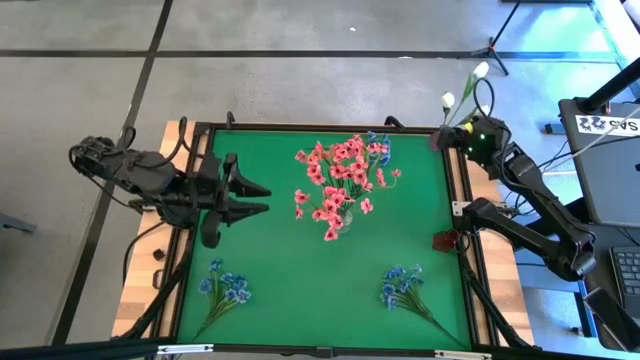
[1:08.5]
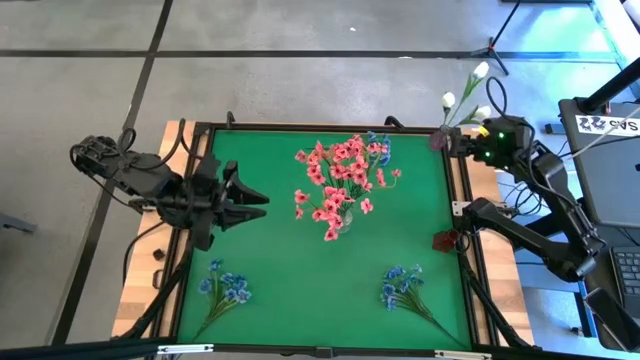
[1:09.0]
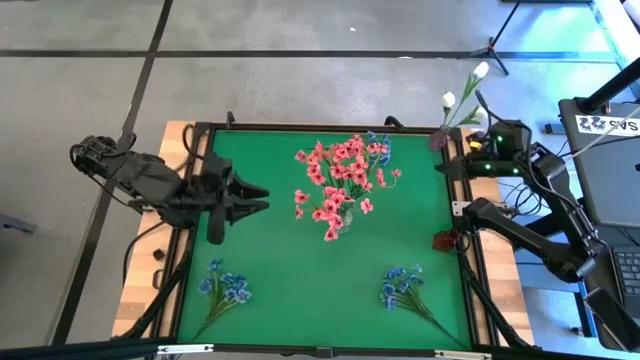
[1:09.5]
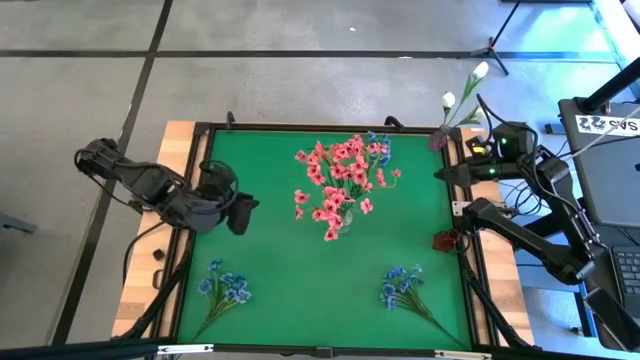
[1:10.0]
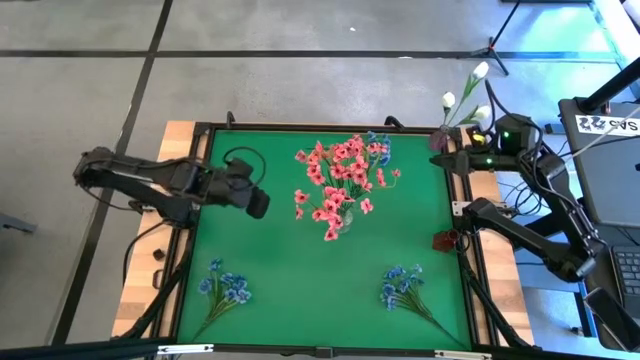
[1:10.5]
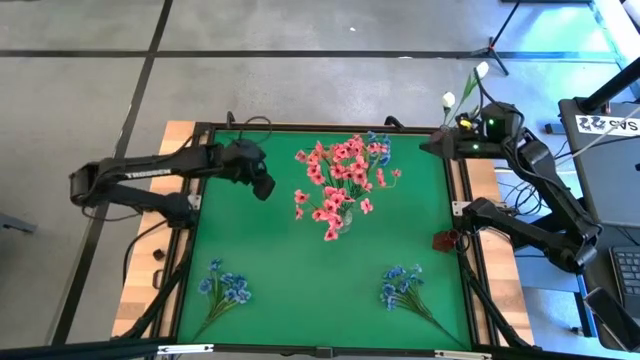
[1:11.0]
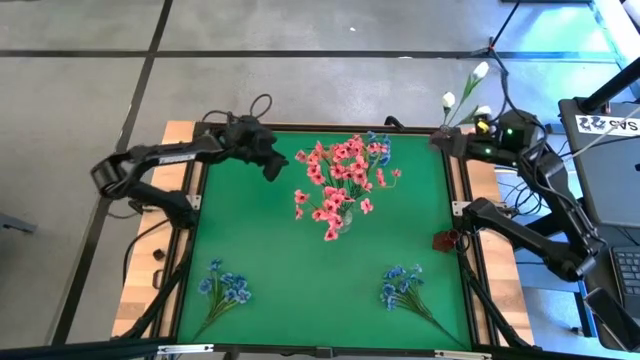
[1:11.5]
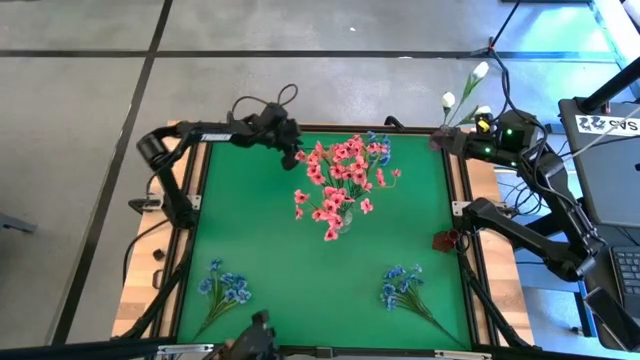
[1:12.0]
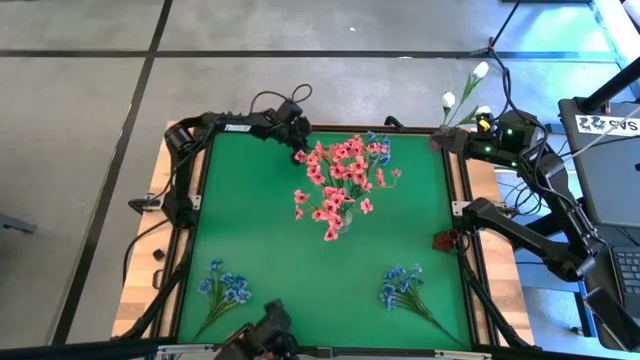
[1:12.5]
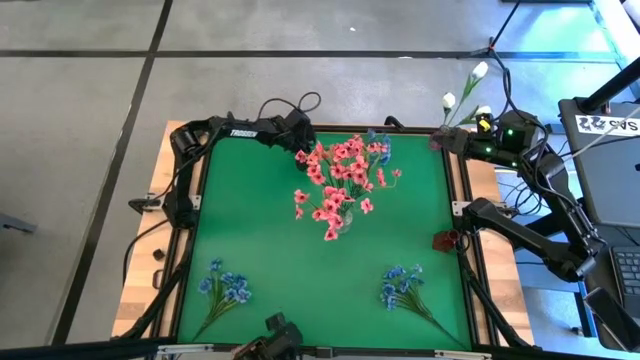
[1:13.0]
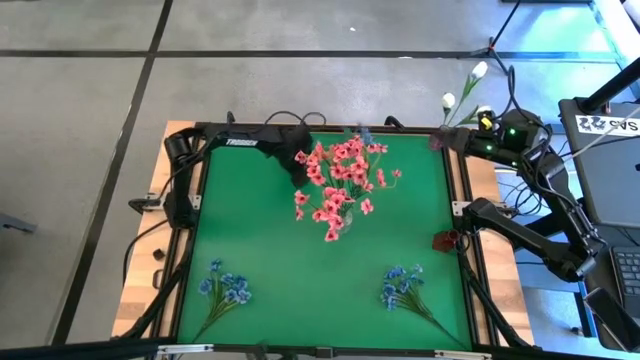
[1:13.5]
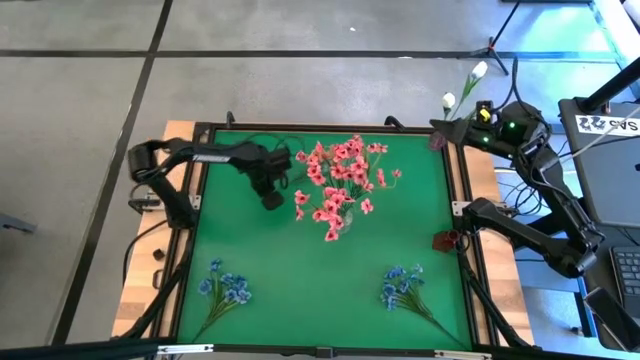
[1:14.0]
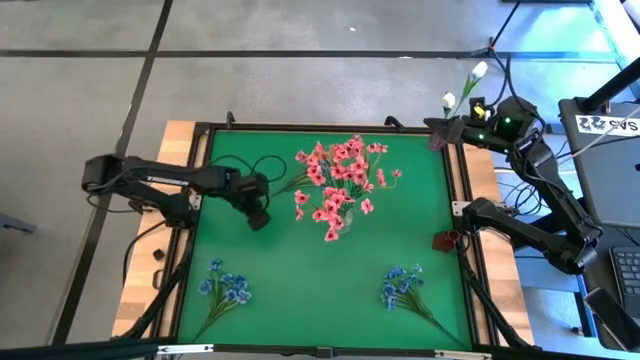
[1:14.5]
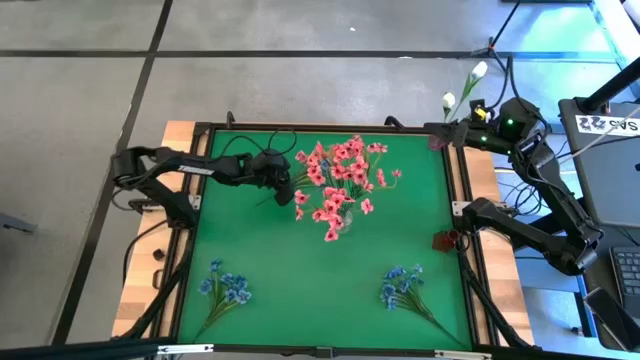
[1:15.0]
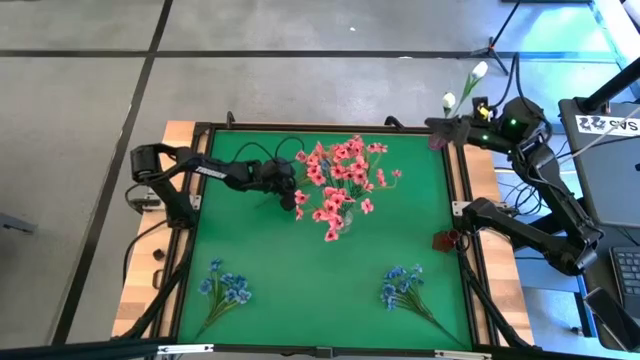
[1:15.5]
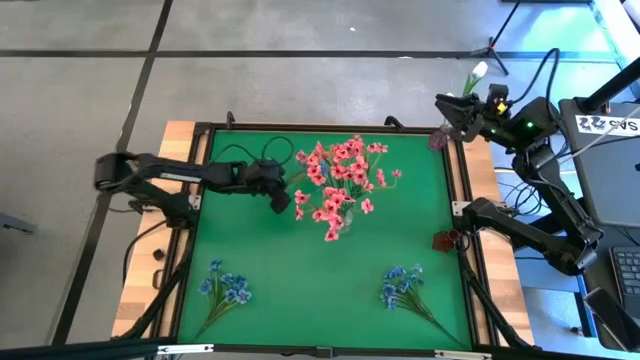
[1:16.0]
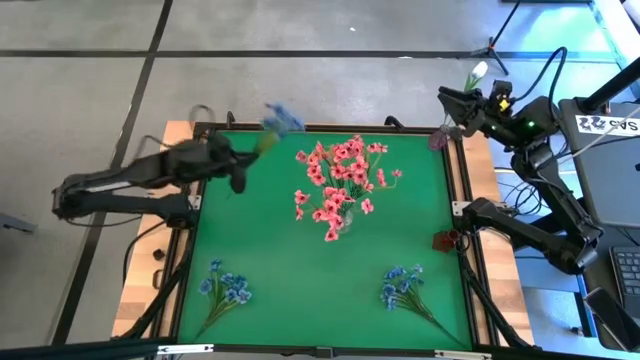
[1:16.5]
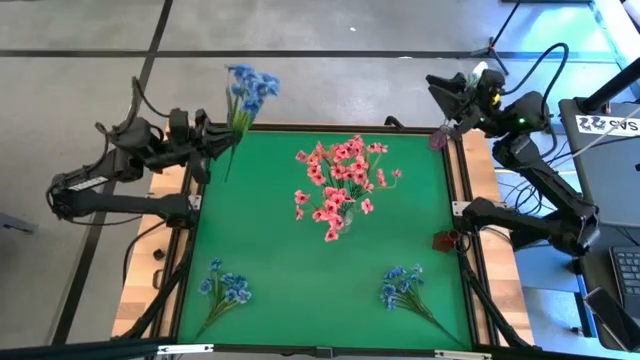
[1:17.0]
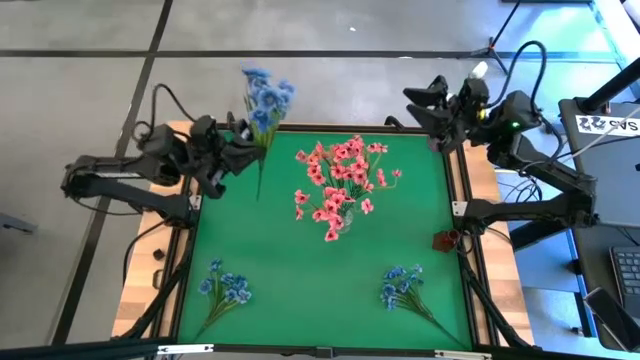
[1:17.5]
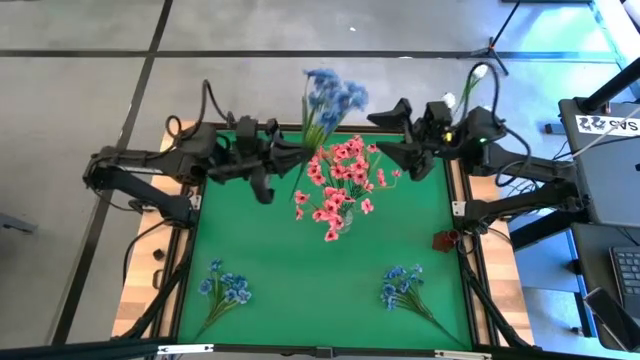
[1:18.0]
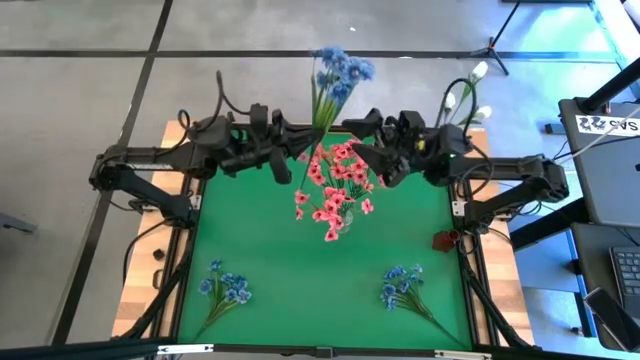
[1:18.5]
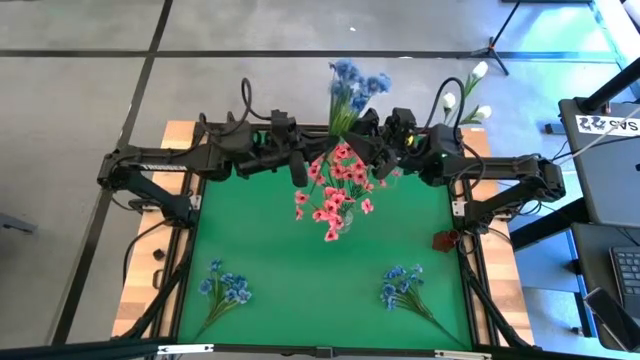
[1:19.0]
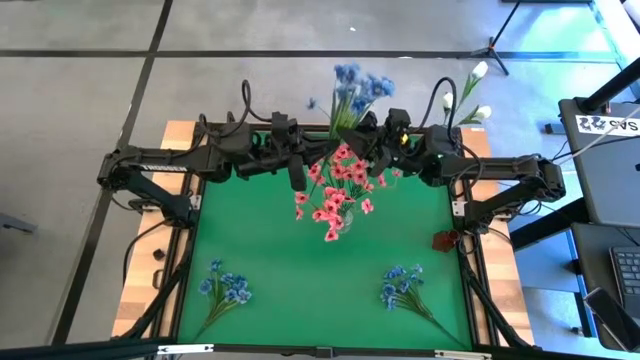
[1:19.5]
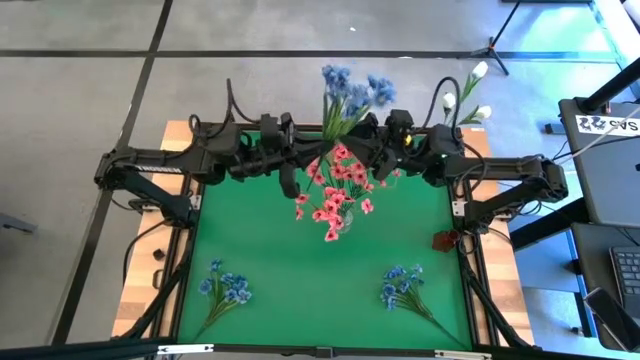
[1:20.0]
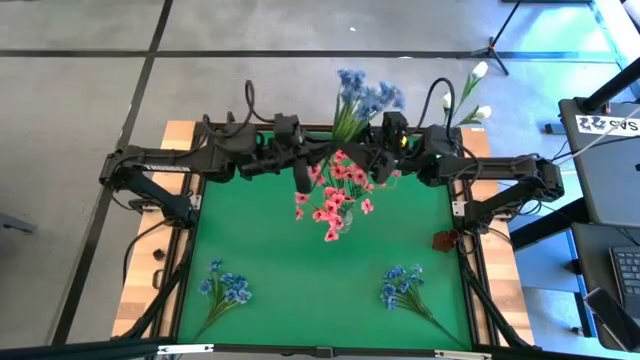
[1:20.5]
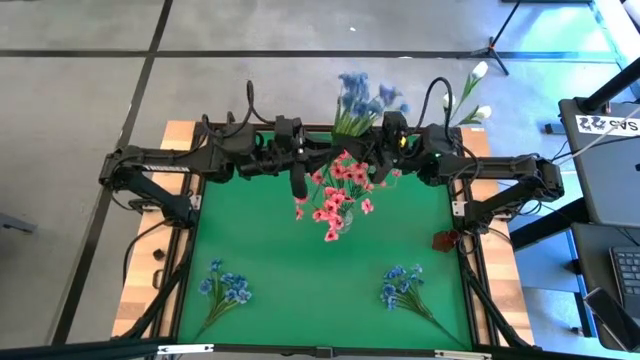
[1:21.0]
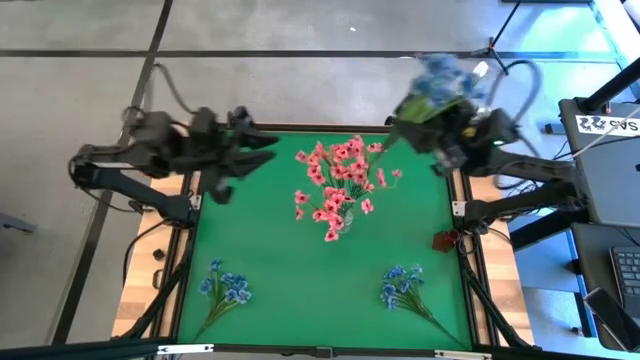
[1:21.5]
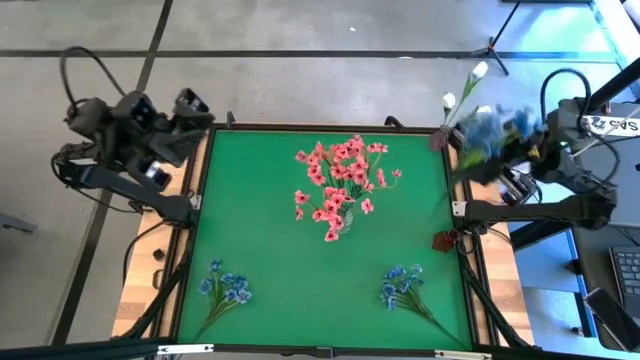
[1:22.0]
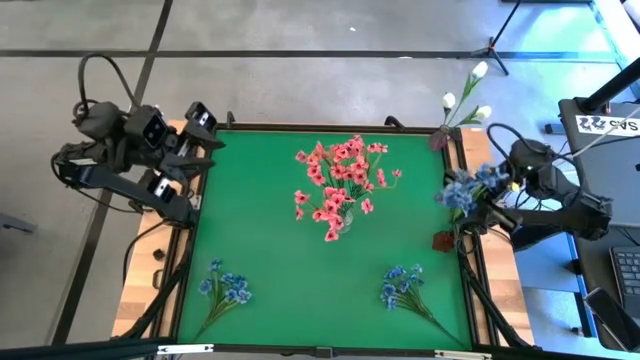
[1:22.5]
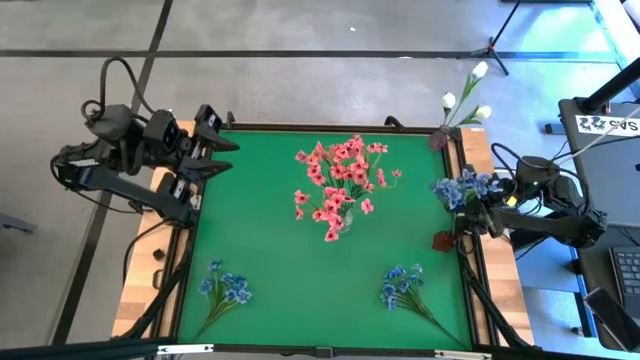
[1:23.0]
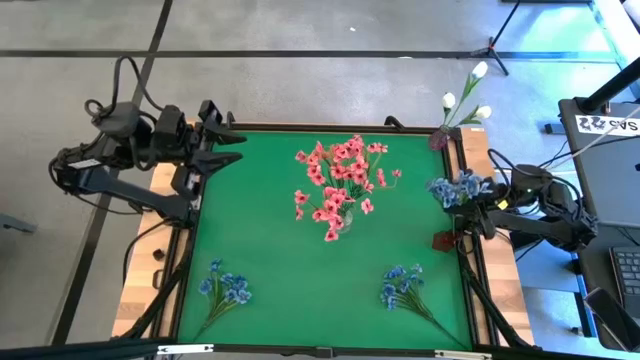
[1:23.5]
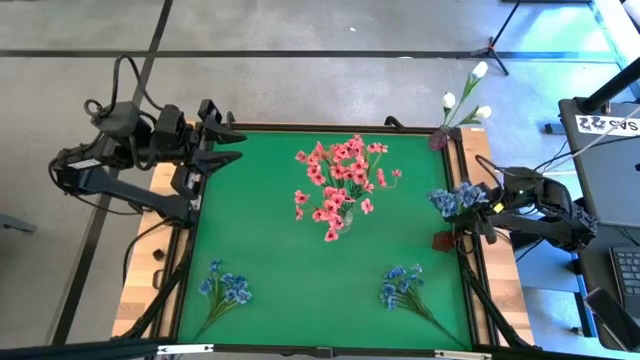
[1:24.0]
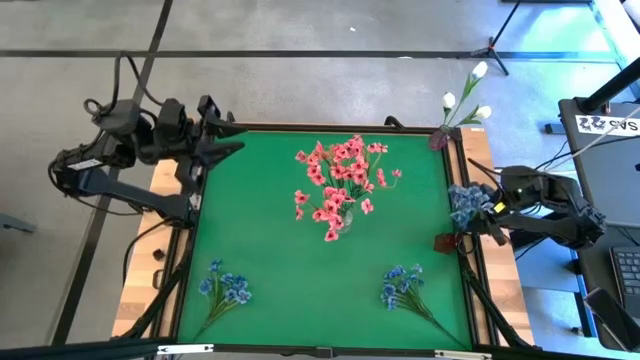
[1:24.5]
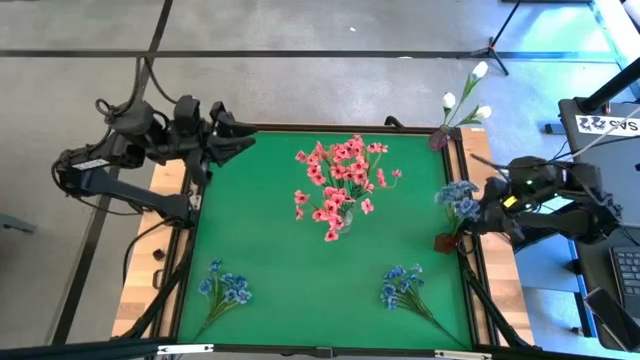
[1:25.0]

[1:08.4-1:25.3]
Task: Sort flowers into vase by color
Put the top blue flowers into the red vase

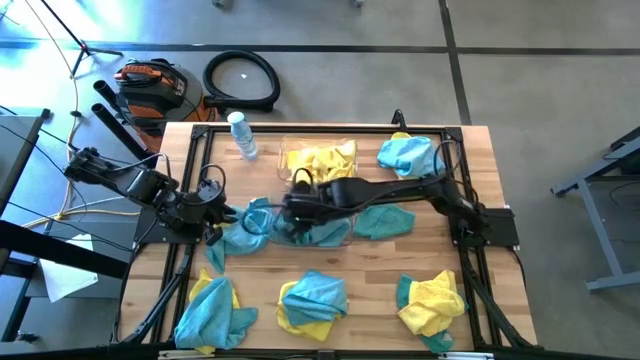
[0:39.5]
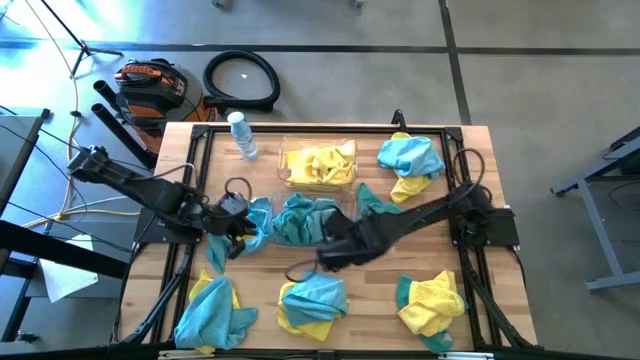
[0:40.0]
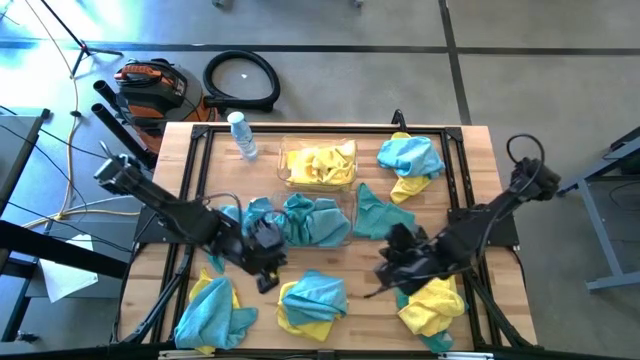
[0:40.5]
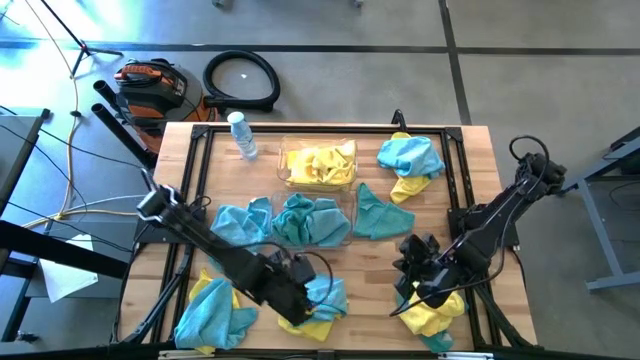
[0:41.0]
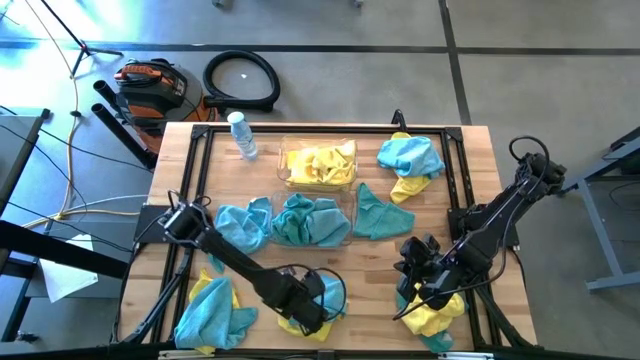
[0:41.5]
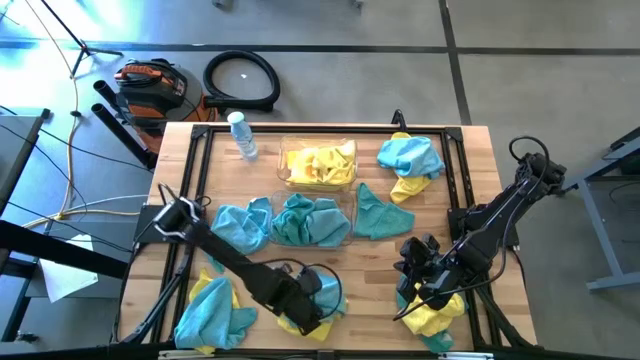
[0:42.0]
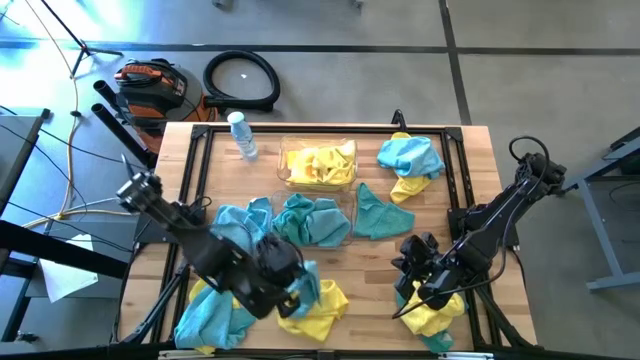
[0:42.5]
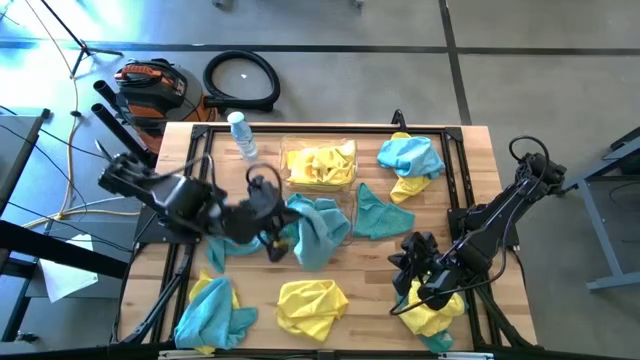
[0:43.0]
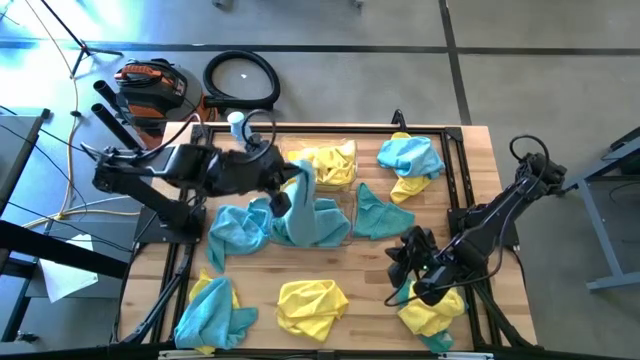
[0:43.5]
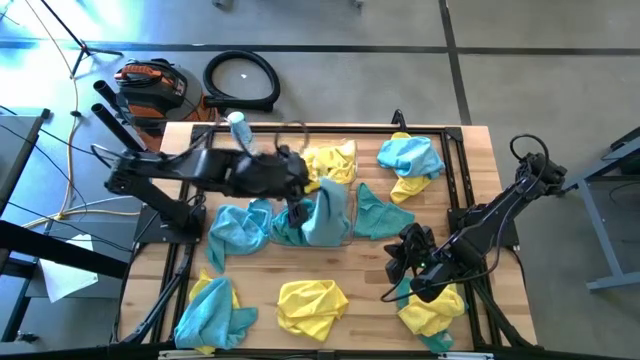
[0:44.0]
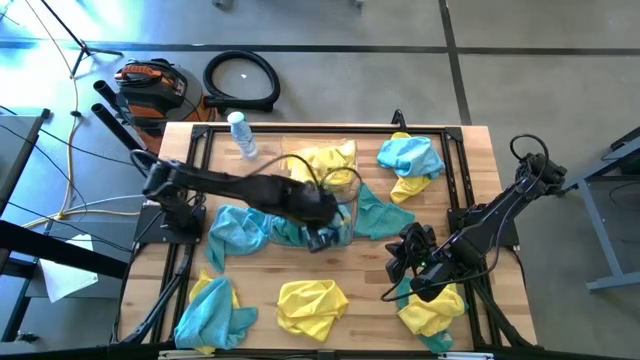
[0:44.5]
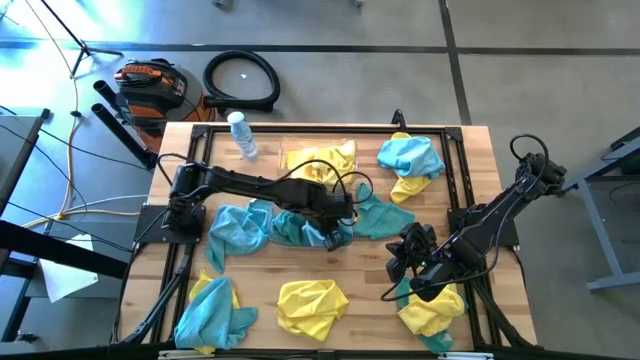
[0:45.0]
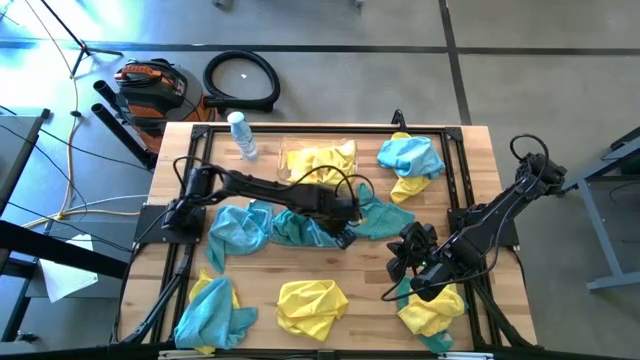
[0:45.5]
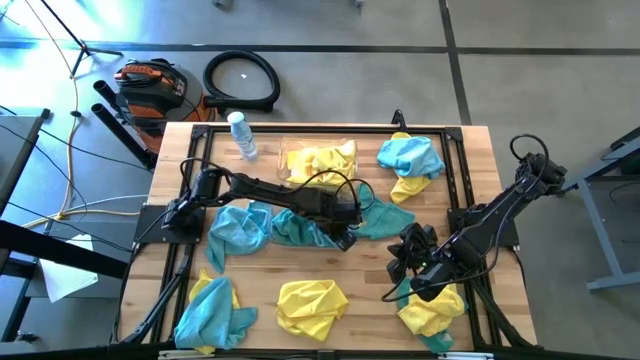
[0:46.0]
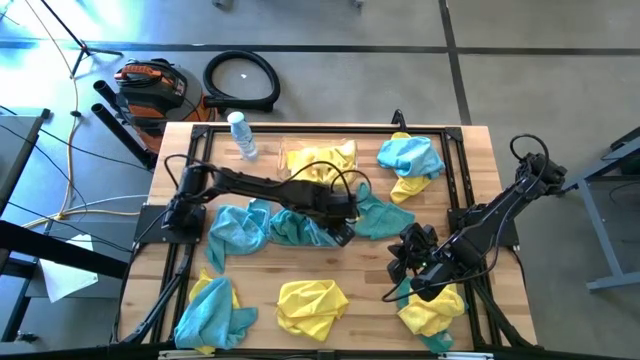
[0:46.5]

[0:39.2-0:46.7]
Task: Sort microfiber towel by color & place in baskets
Put the blue microfiber cloth into the bottom transparent bin
